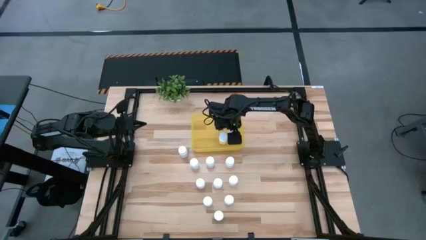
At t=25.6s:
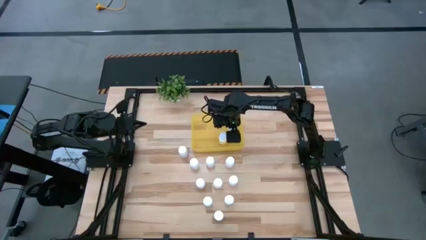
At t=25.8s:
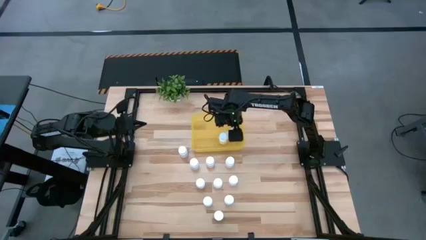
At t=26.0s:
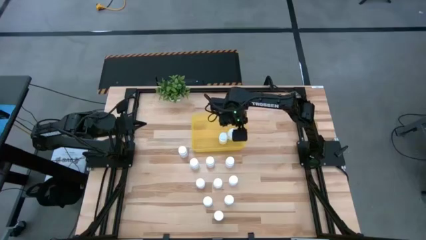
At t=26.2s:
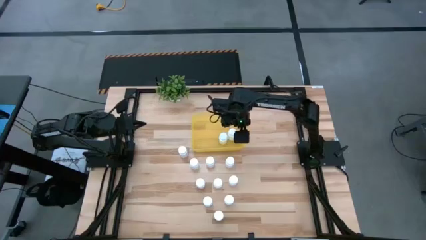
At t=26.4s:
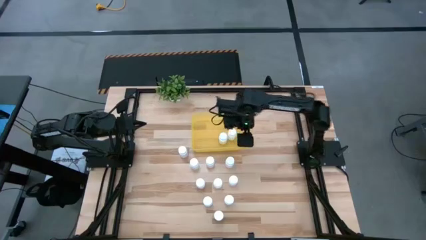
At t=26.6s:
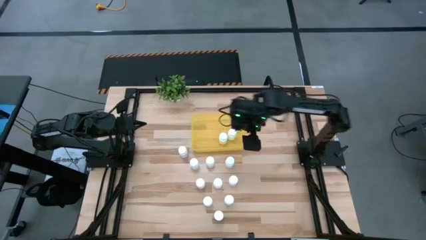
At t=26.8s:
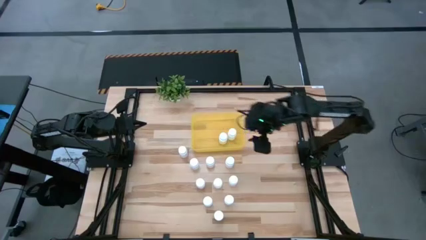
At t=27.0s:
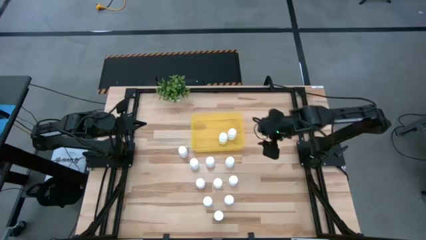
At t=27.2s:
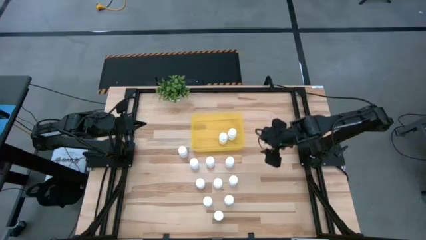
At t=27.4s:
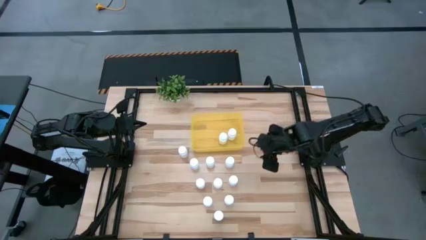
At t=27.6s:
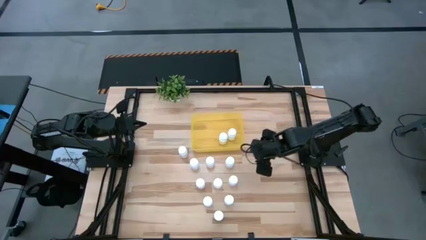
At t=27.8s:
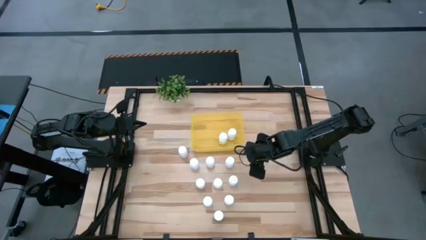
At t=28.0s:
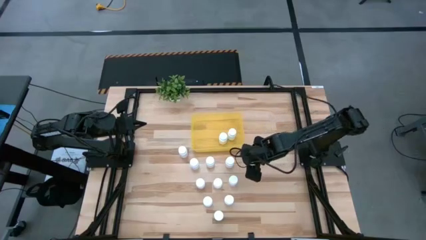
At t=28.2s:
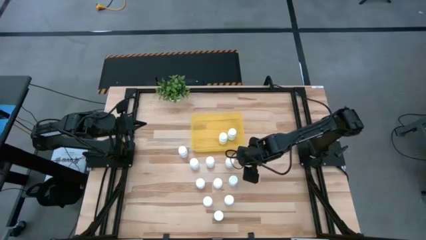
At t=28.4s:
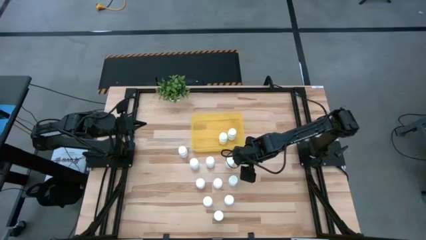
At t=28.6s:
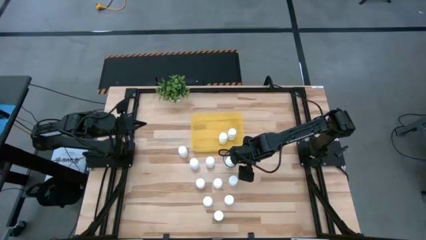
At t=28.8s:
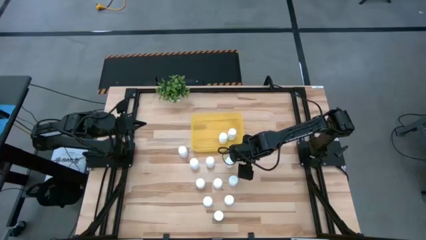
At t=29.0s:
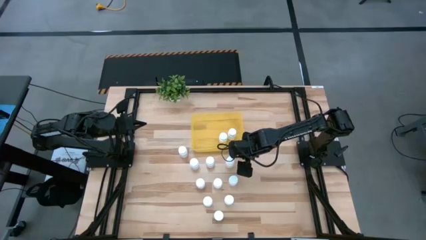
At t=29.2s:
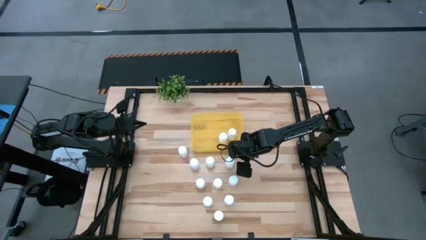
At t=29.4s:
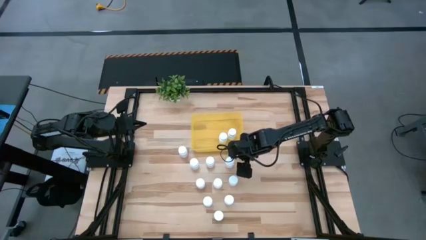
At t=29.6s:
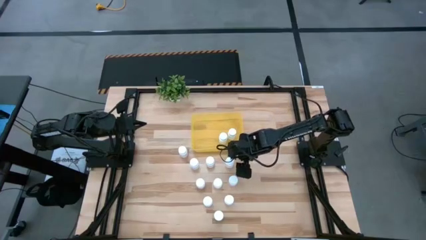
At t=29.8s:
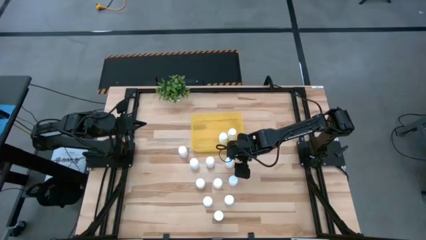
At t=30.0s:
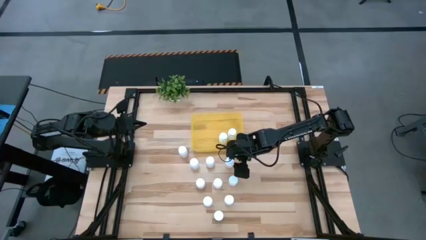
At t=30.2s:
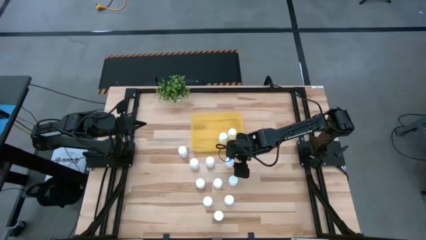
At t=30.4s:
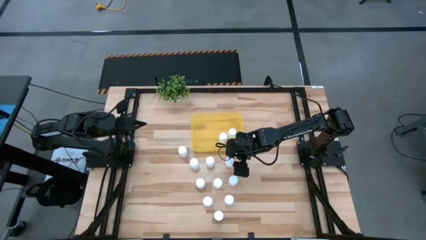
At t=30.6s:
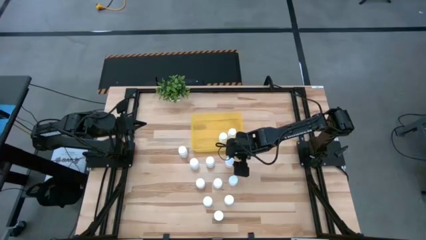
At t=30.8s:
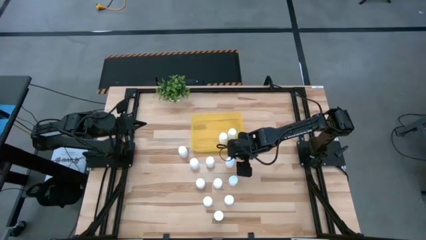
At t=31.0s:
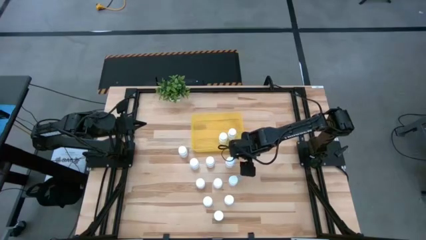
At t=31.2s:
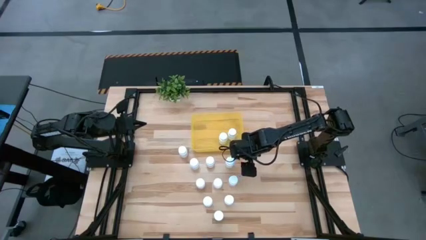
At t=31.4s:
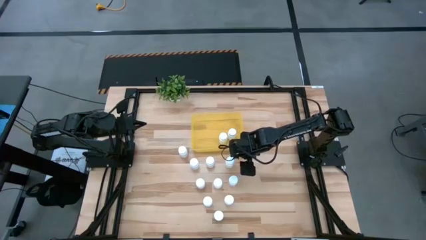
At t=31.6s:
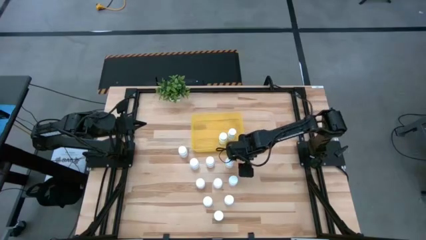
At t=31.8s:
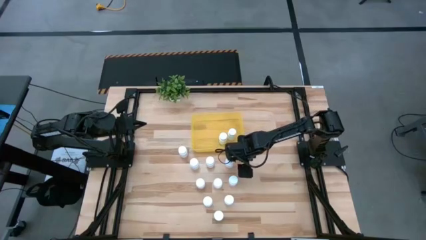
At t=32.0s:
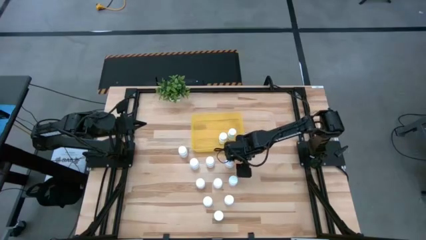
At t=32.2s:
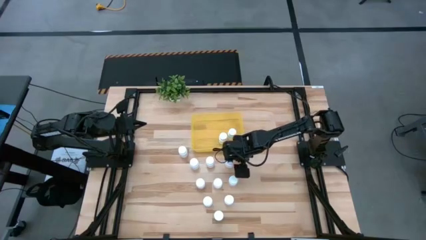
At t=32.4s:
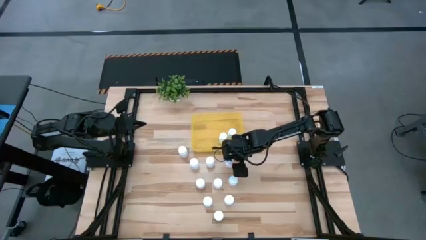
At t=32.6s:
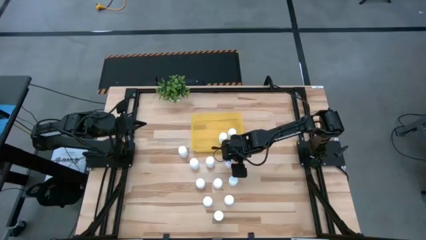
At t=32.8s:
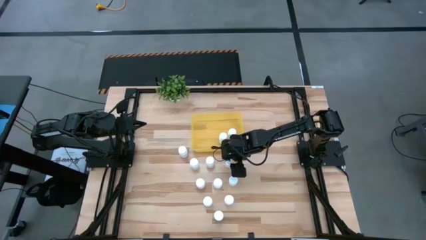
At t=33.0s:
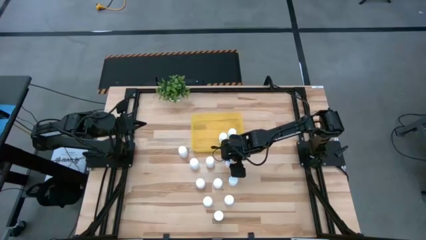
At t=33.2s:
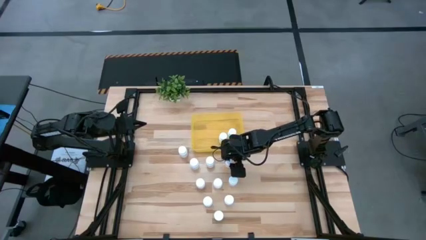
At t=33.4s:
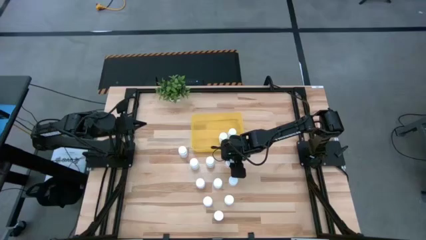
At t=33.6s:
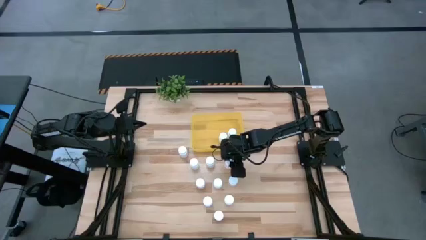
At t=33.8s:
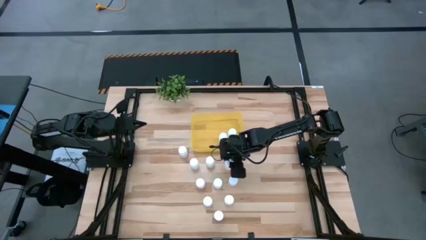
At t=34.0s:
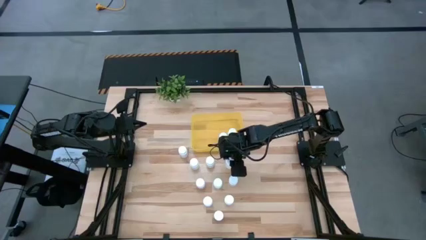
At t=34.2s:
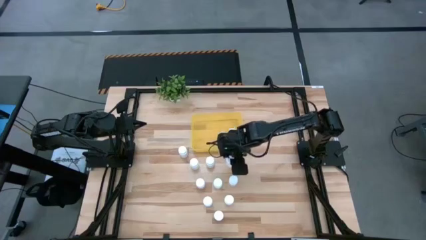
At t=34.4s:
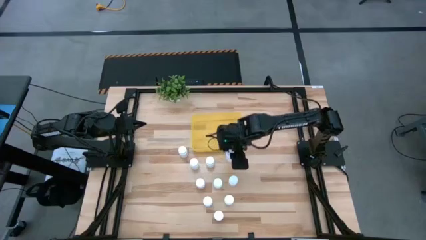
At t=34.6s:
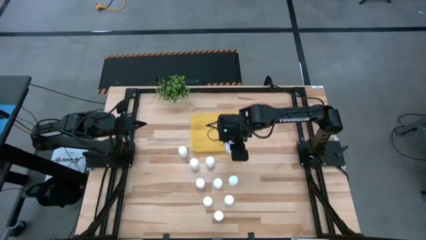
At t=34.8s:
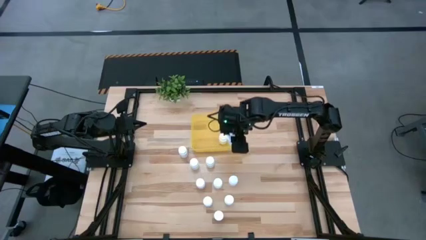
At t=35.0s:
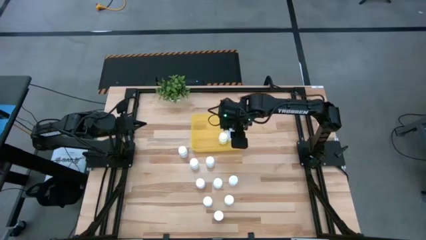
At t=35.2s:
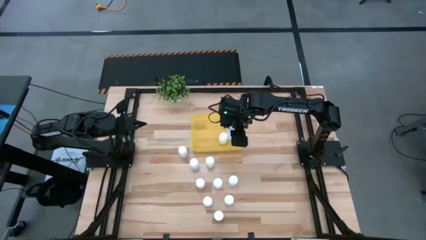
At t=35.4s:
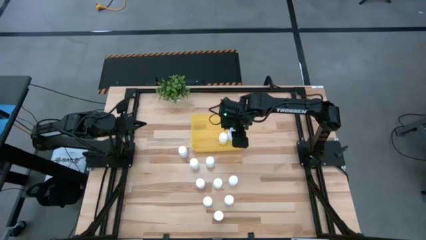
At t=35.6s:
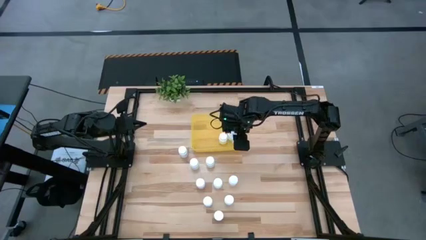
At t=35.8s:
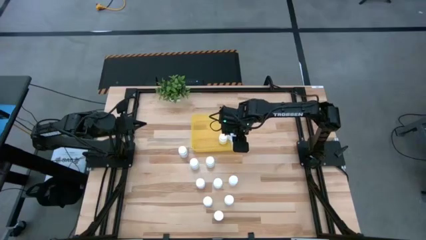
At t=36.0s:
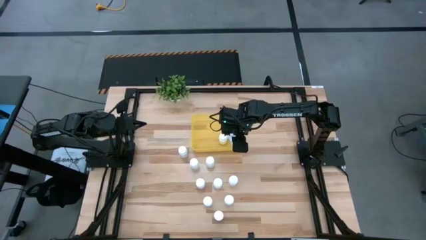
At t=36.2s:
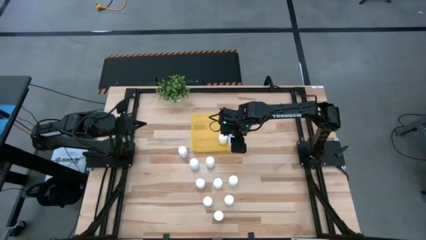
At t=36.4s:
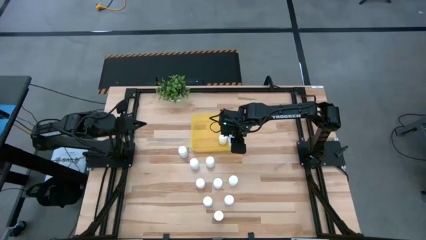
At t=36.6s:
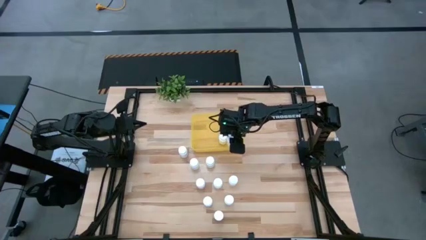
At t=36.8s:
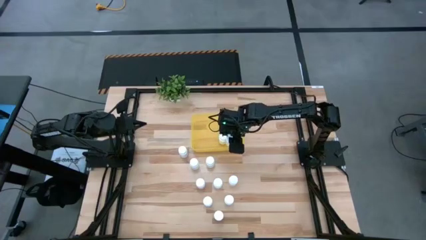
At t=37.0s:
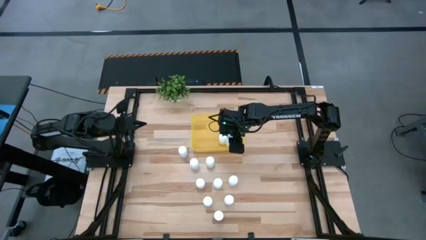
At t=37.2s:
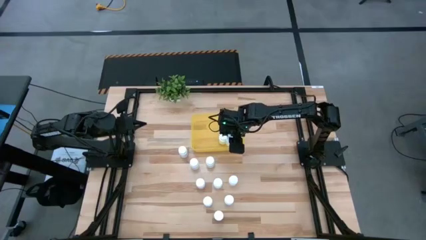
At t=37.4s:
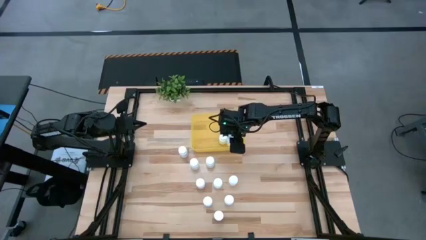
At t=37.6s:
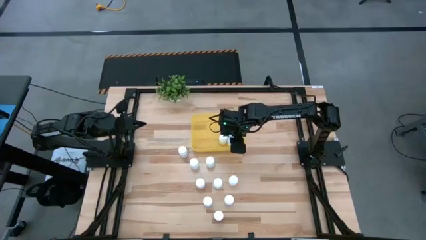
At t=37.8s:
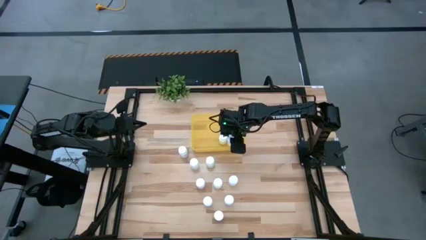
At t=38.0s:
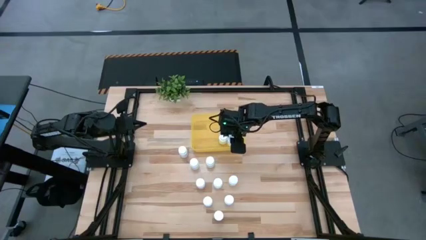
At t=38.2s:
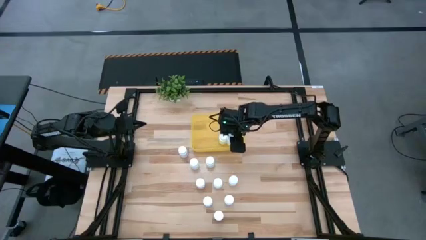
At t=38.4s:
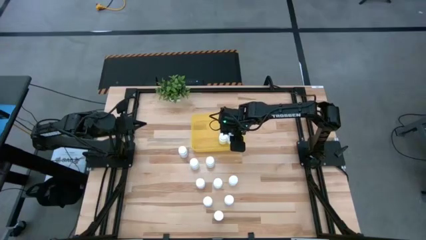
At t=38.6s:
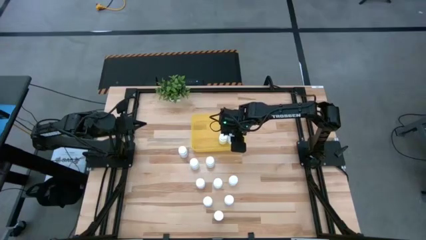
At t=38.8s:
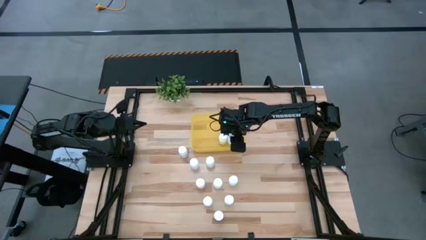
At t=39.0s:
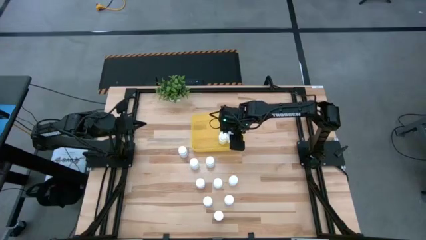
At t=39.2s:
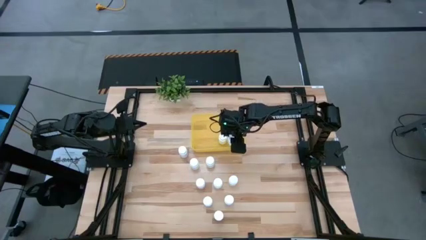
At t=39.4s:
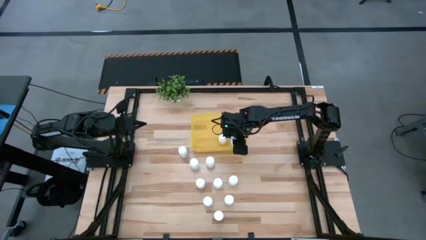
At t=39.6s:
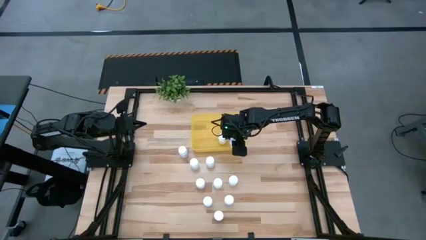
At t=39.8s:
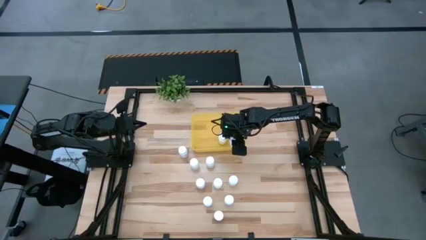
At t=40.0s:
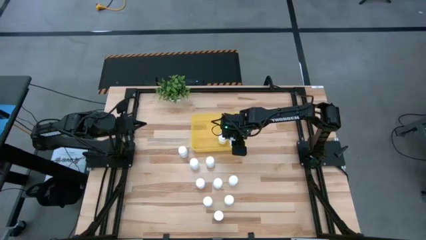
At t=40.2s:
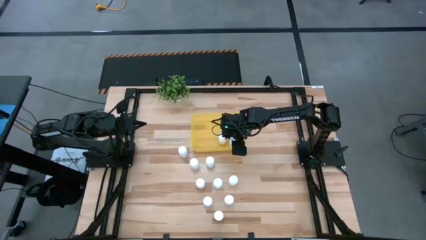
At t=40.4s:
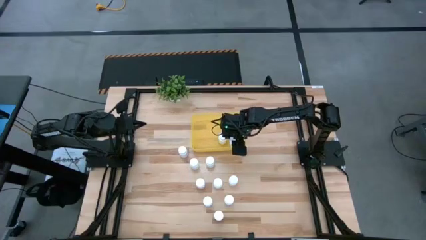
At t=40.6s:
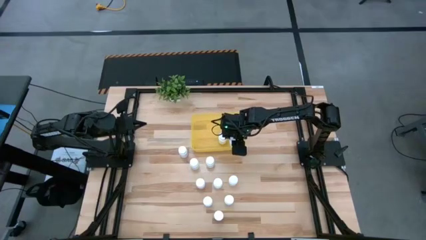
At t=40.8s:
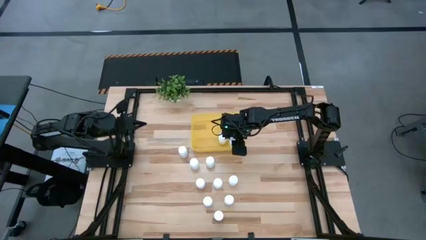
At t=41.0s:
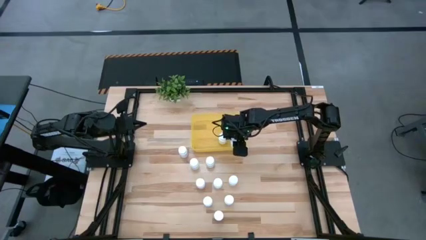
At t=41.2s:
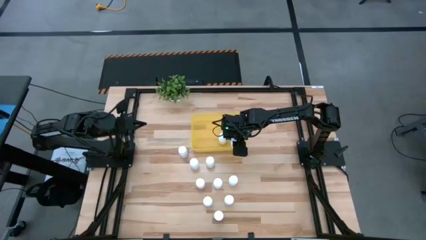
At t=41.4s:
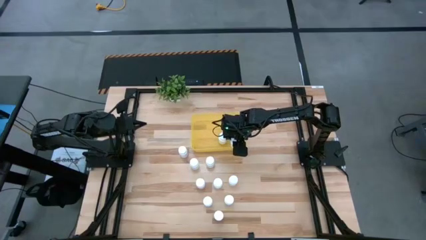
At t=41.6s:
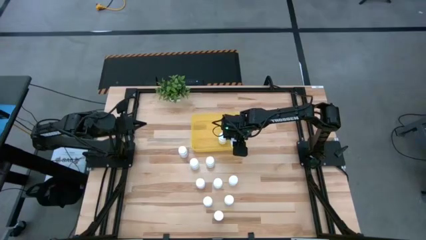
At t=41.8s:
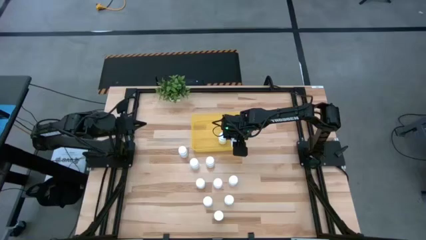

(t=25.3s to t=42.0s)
Task: Pick and place pill bottles into a basket
Put the white medicine bottle into the yellow bin
